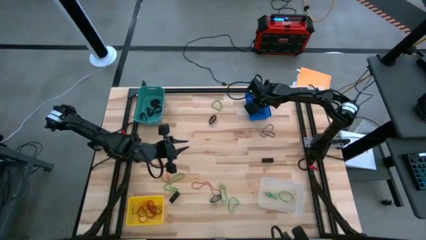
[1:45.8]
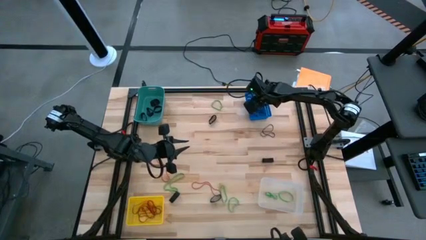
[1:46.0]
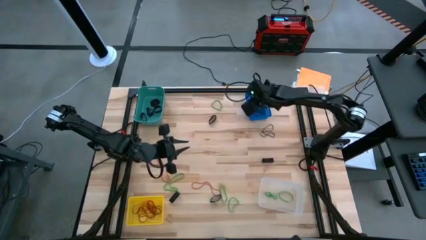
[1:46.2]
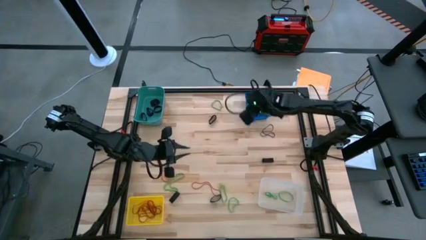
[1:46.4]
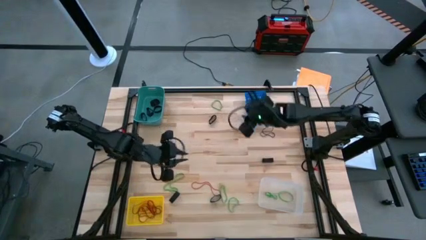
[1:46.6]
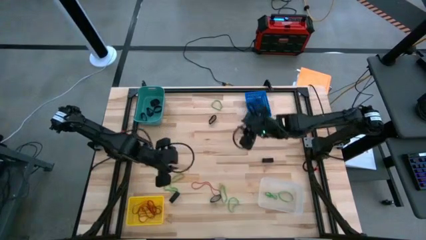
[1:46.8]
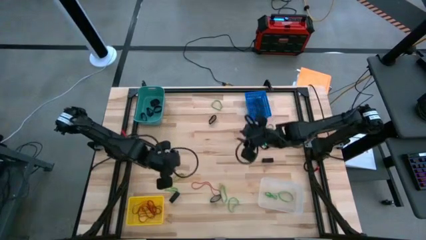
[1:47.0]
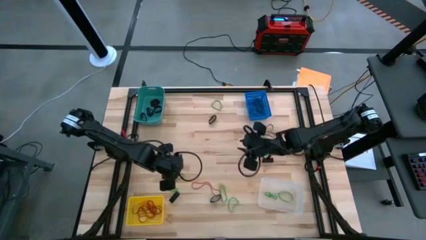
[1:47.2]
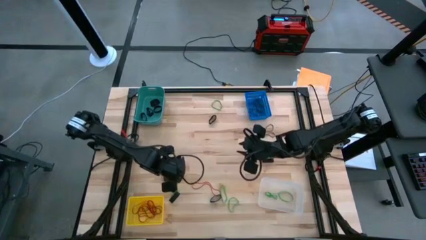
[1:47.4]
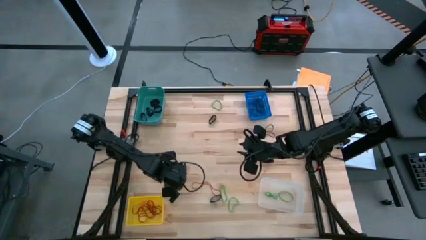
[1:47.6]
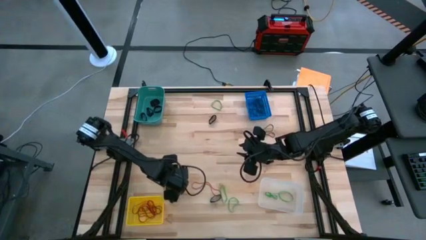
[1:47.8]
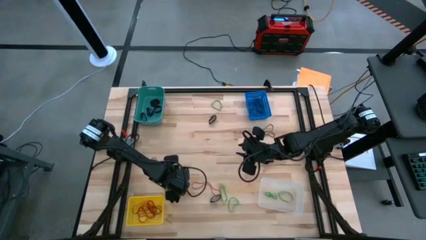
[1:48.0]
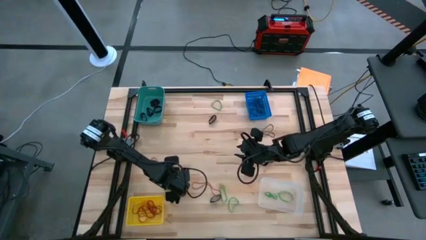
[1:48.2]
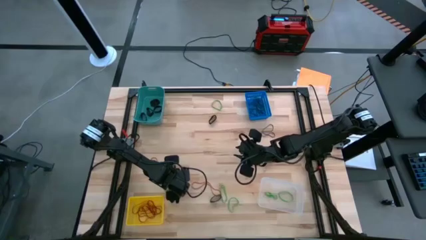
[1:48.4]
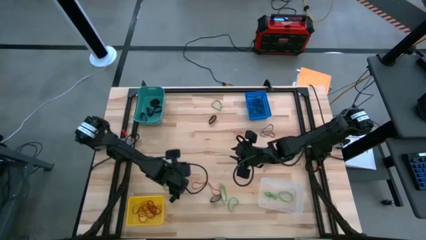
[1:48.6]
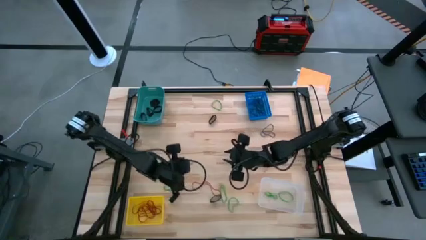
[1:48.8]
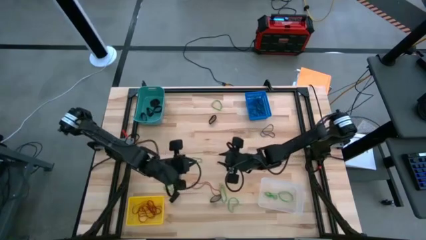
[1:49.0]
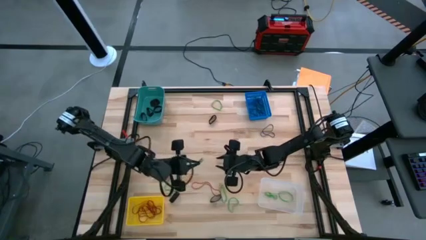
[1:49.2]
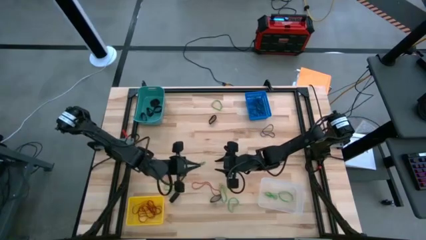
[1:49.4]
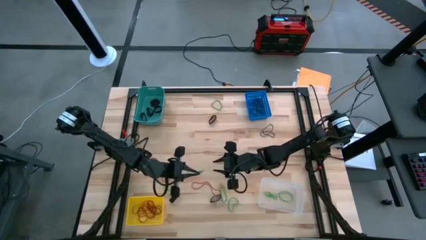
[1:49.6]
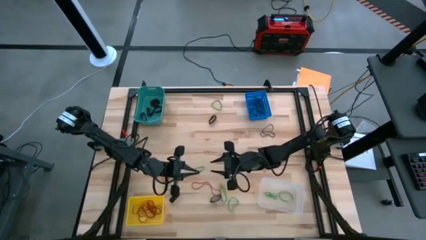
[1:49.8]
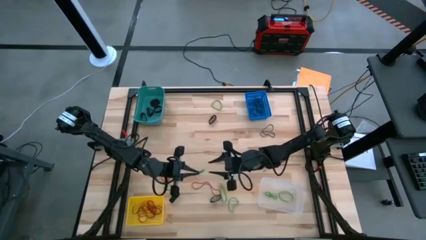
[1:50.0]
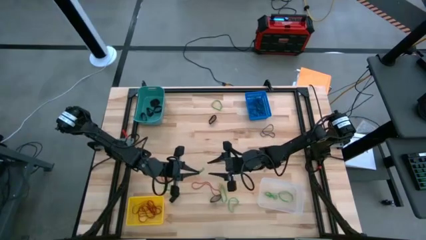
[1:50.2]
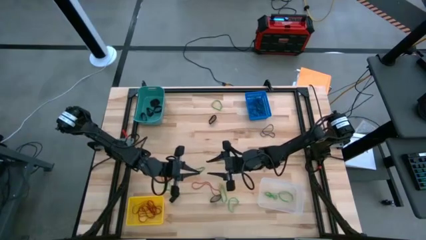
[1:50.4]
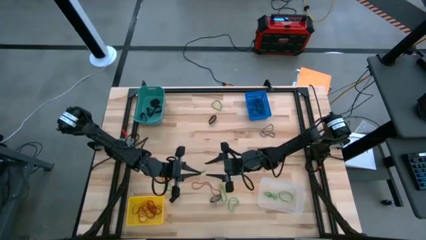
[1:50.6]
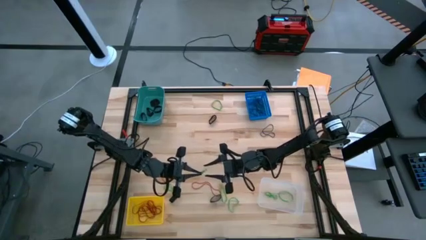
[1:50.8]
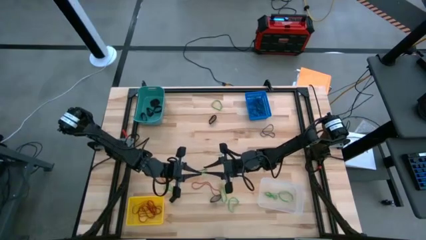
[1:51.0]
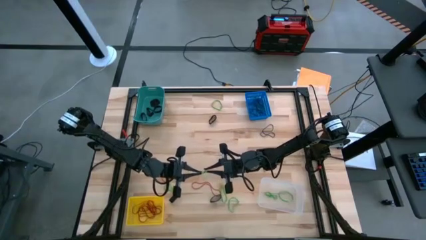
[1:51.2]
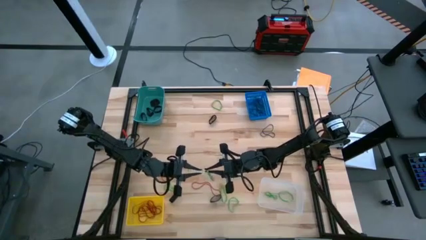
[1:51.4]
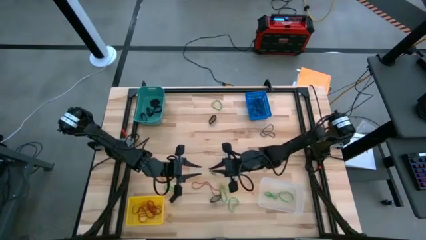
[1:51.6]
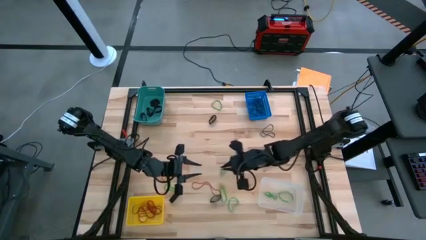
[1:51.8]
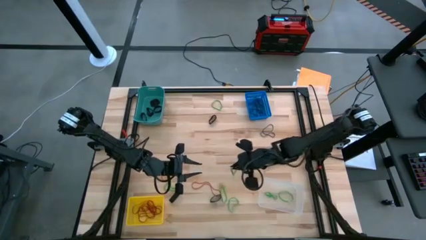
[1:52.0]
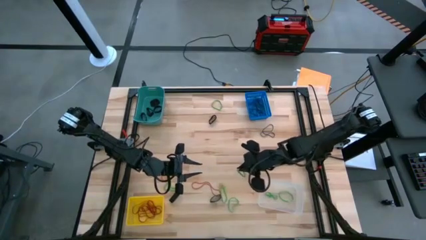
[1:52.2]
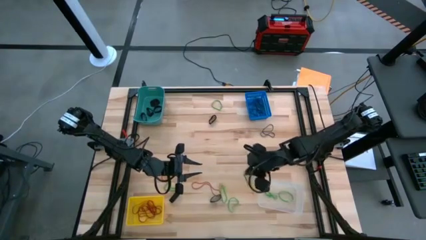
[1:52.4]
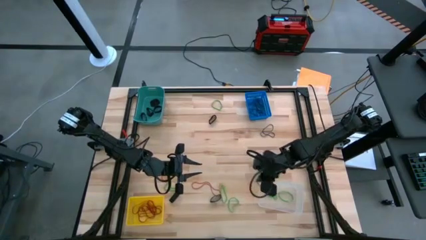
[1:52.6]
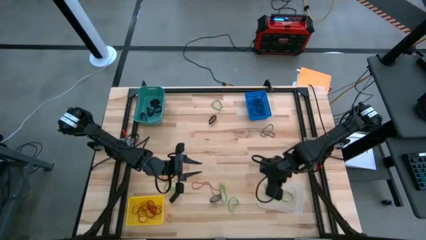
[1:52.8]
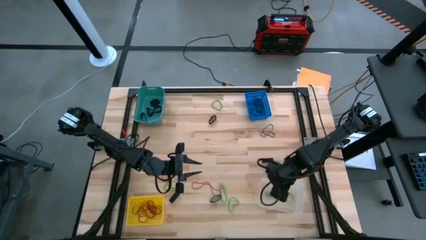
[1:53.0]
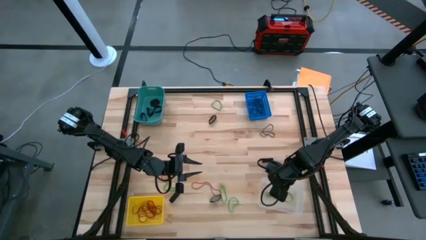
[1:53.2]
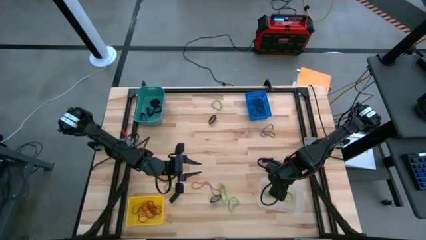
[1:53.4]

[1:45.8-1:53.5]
Task: Sort rubber bands into baskets
Put the green rubber band into the transparent bin

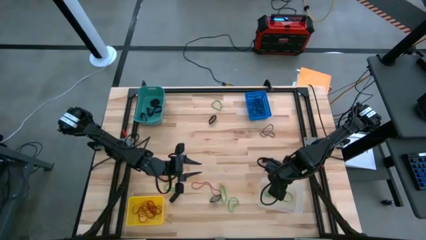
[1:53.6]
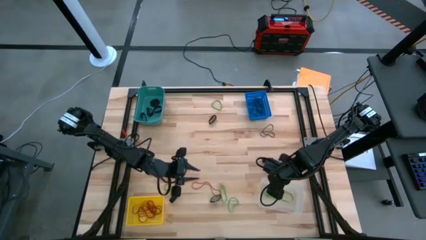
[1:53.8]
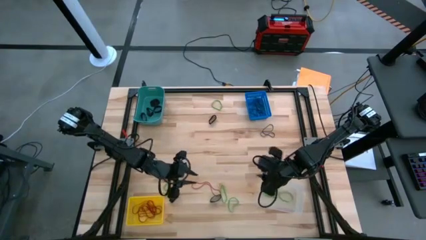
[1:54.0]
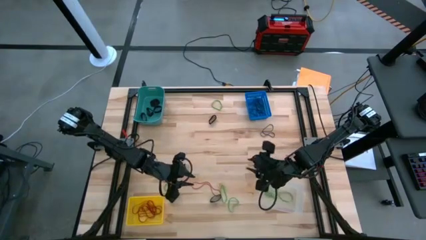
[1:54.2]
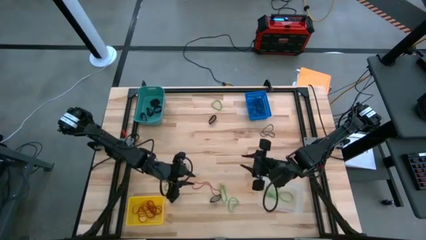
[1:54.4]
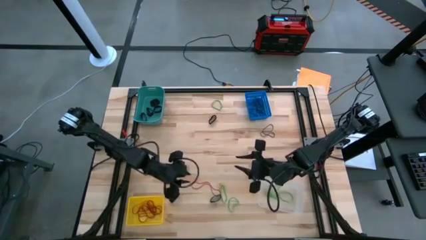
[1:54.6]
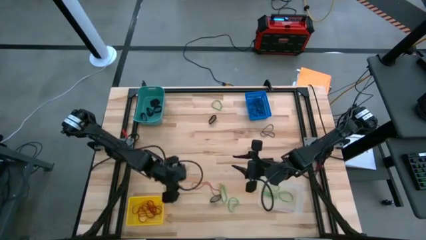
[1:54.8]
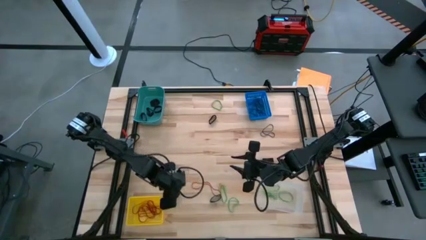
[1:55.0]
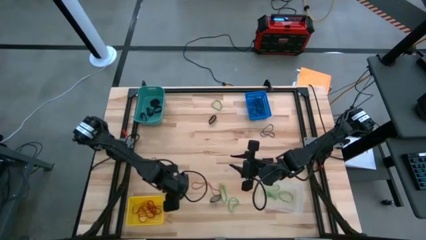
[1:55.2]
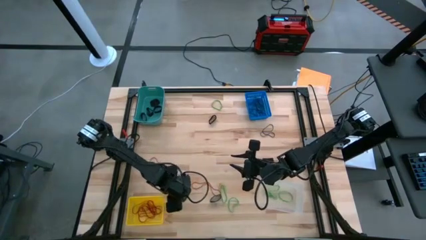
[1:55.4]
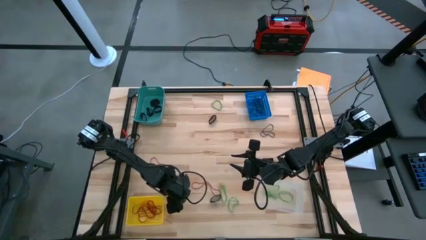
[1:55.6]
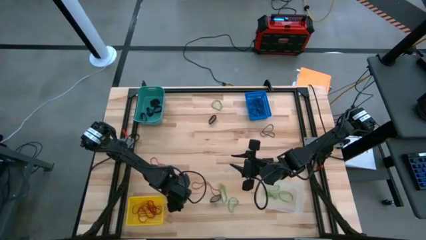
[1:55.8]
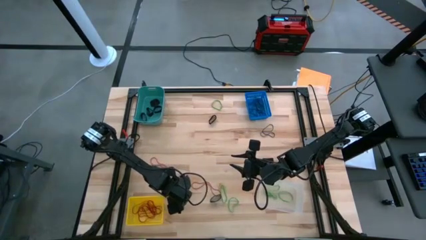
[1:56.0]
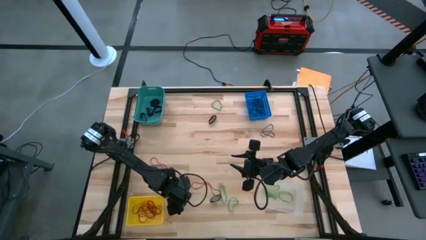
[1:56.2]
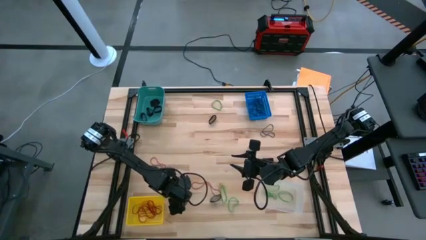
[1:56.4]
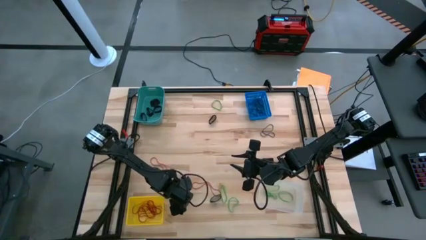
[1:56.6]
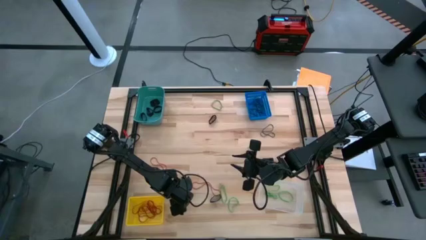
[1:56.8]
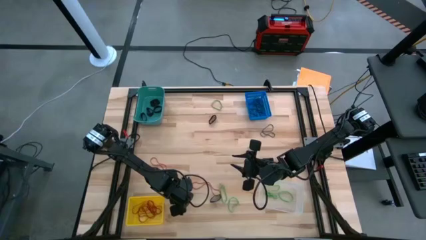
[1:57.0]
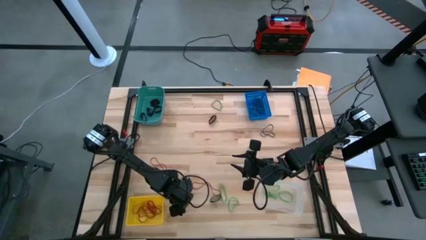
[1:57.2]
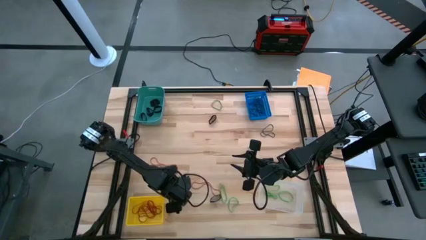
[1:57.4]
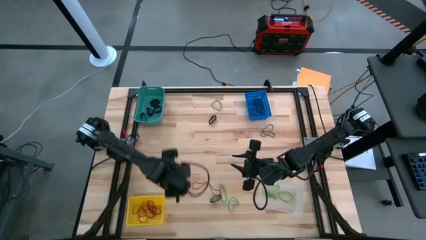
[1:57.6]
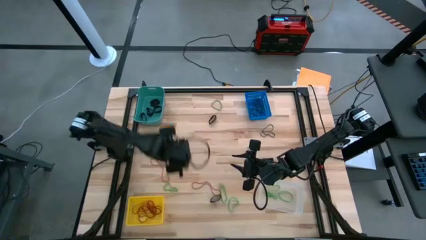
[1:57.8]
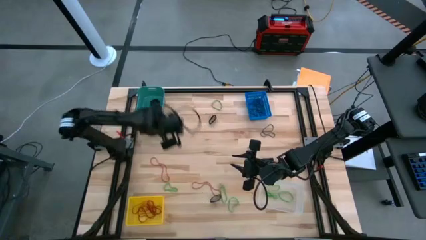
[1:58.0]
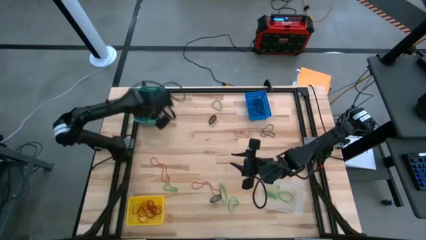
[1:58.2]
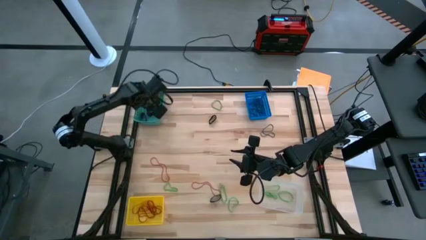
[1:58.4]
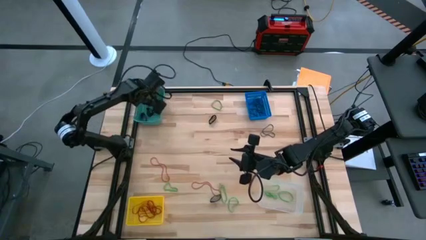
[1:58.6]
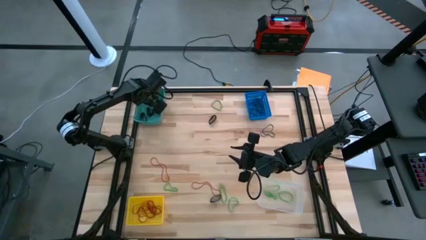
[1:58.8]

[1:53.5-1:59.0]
Put the thick black rubber band into the light blue bin

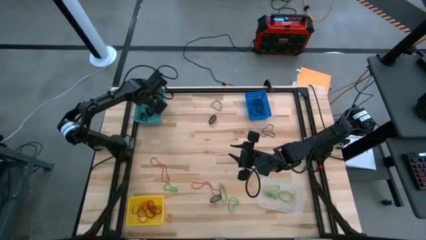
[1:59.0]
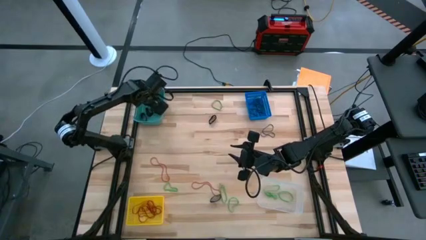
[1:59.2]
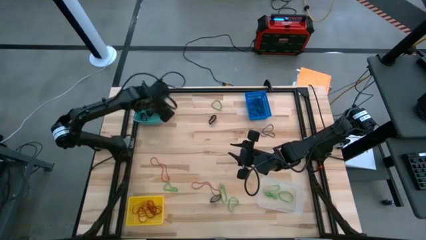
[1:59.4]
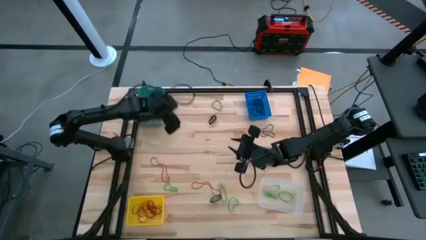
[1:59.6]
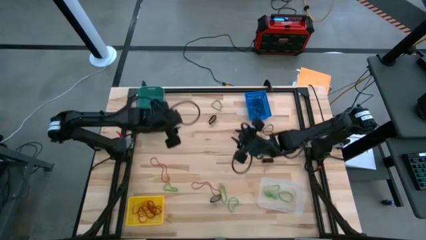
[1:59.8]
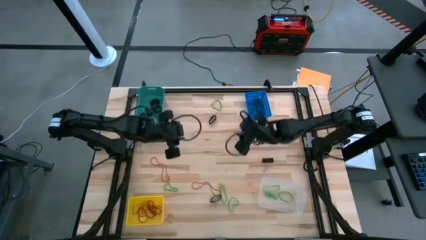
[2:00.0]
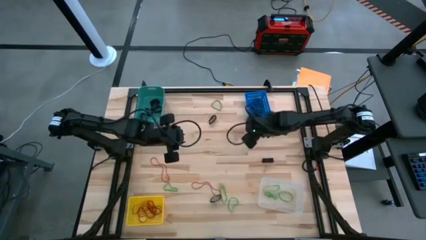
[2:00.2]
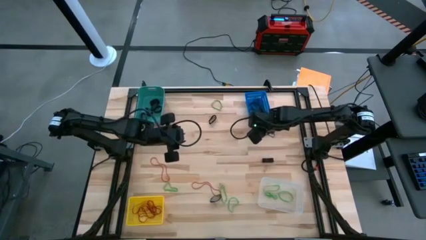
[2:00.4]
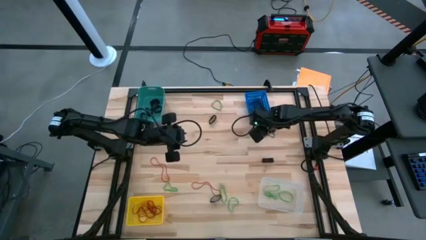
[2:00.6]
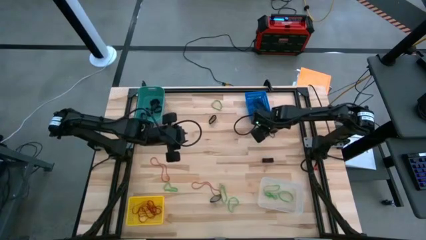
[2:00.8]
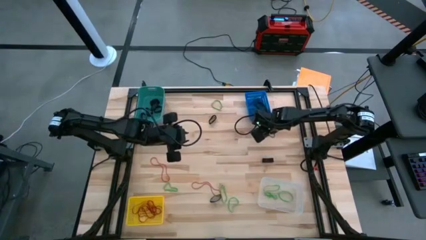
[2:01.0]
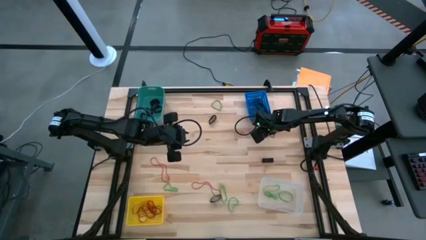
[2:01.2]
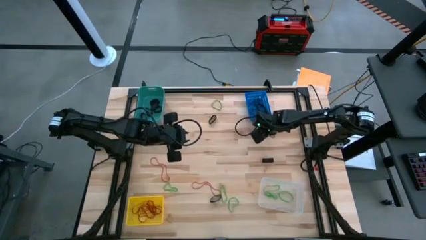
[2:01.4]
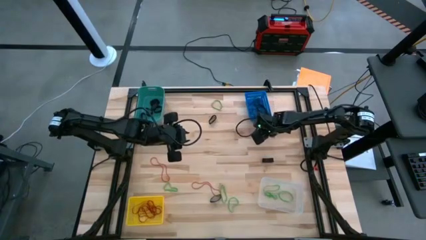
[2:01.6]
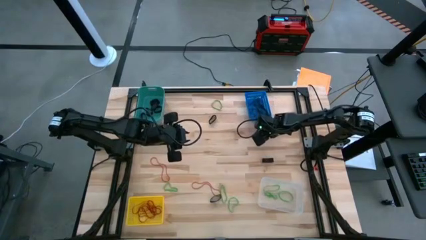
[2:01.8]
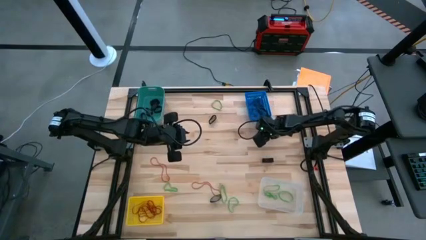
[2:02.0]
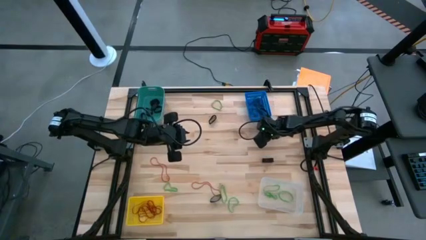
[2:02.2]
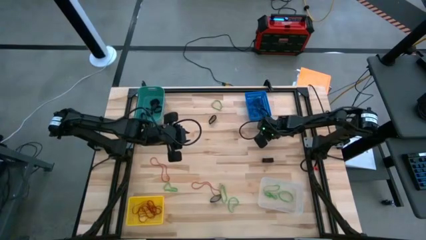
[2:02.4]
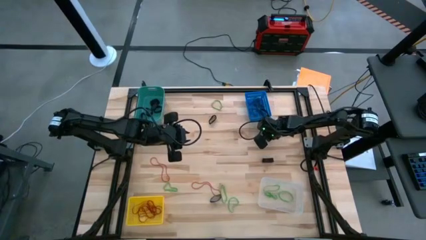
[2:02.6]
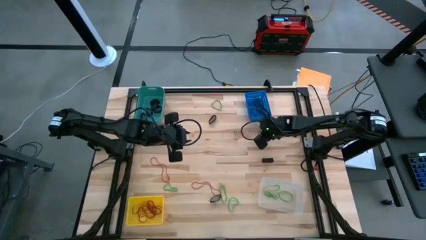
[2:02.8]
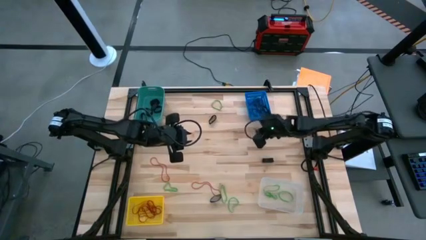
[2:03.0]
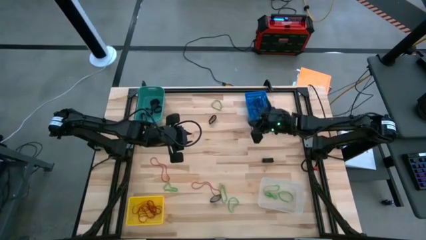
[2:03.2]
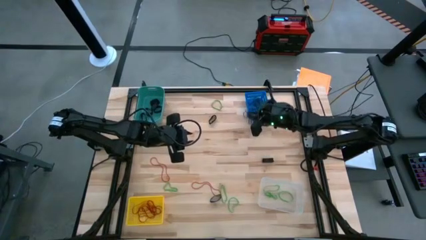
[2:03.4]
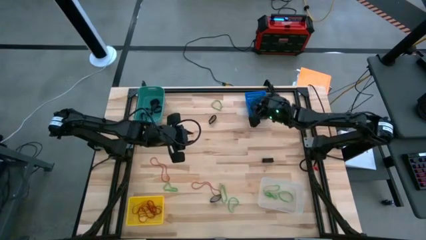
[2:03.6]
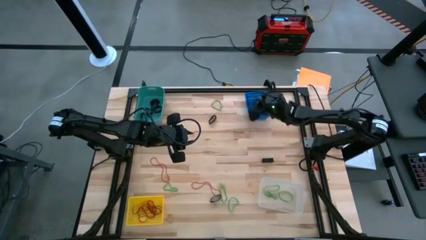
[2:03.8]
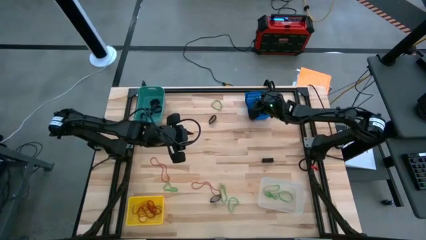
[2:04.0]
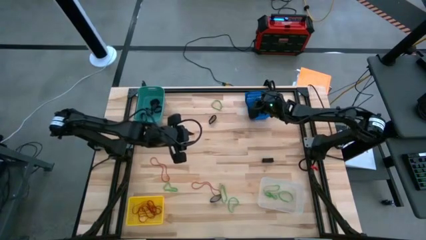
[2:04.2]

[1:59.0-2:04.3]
Put the thin black rubber band into the blue basket
